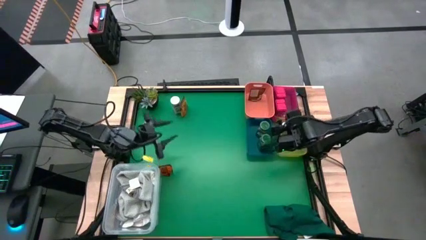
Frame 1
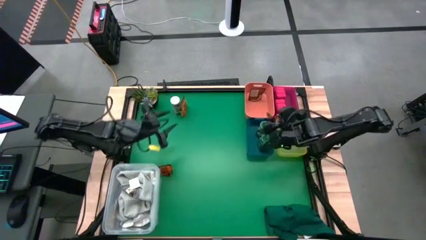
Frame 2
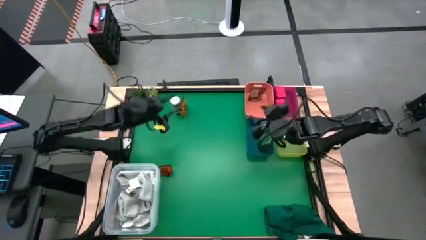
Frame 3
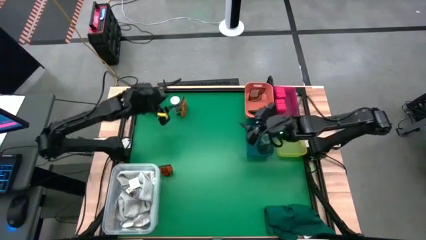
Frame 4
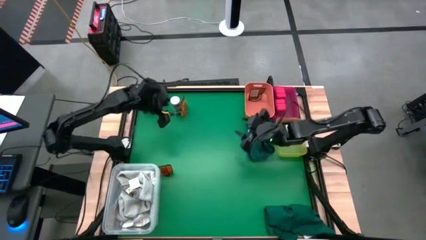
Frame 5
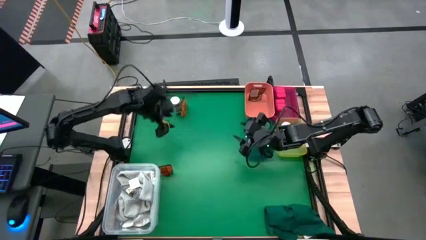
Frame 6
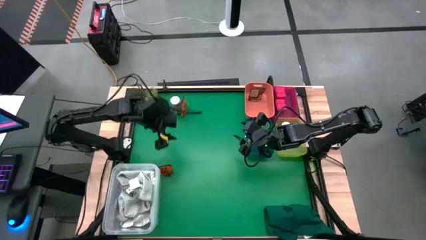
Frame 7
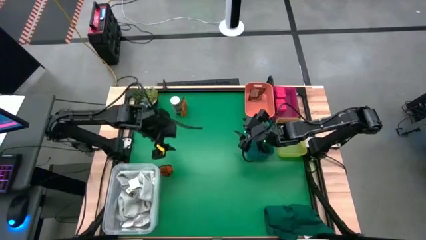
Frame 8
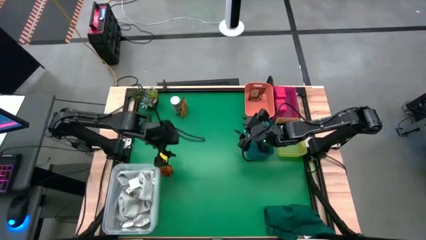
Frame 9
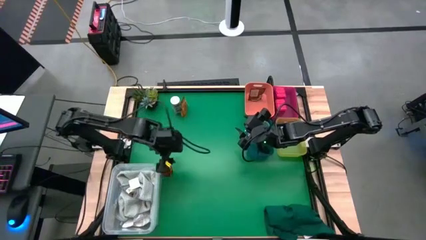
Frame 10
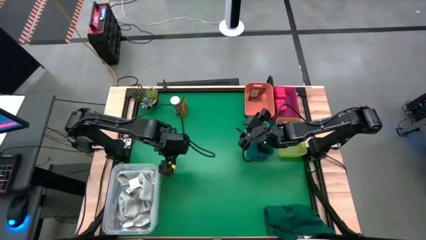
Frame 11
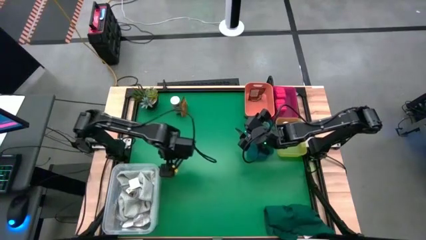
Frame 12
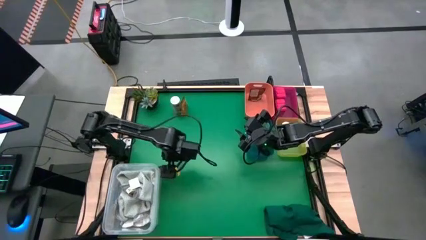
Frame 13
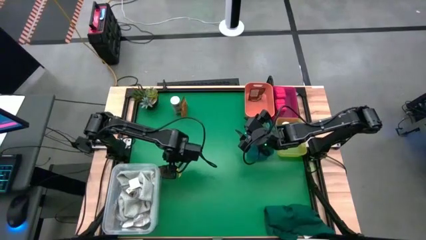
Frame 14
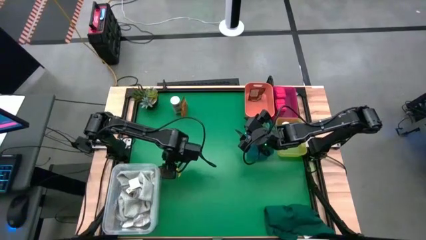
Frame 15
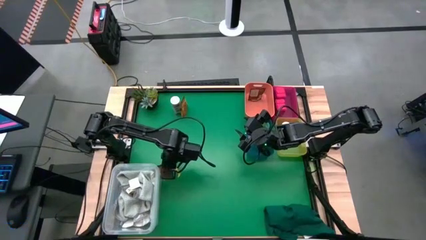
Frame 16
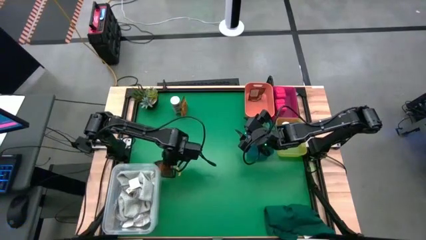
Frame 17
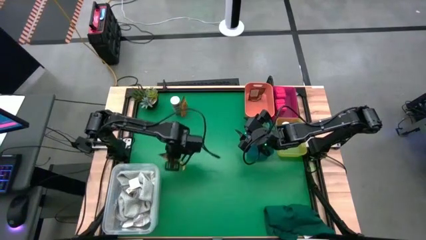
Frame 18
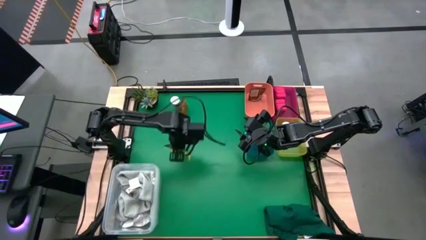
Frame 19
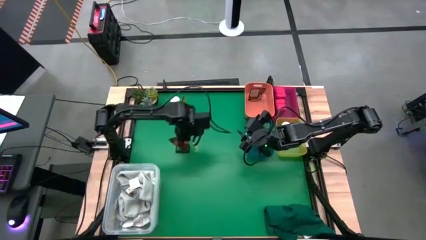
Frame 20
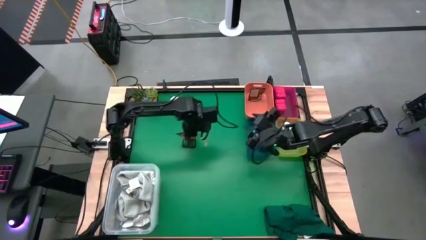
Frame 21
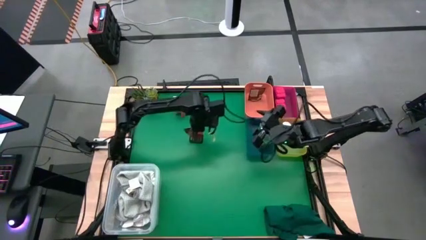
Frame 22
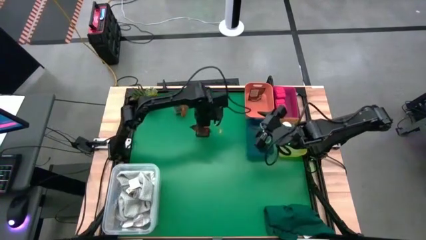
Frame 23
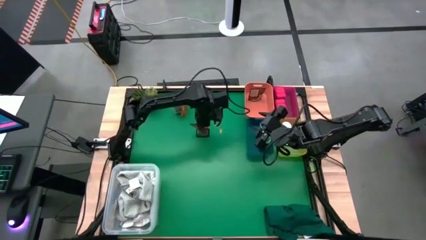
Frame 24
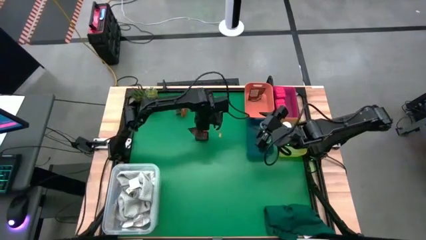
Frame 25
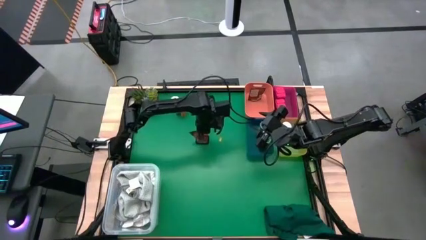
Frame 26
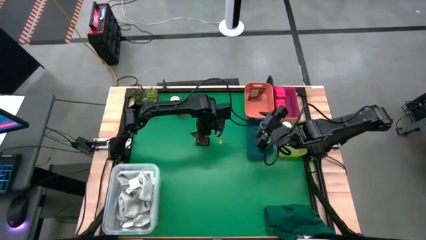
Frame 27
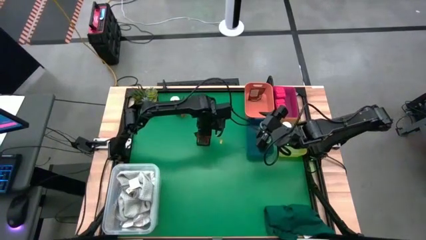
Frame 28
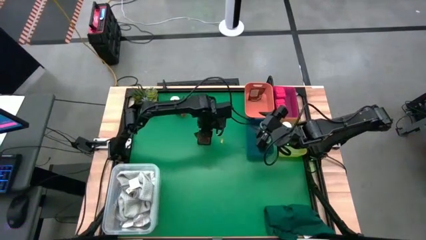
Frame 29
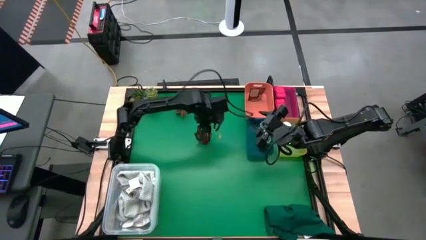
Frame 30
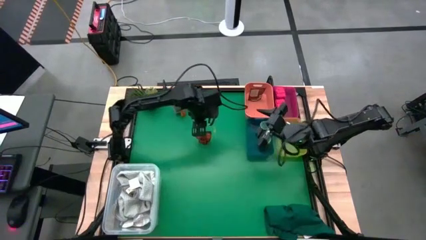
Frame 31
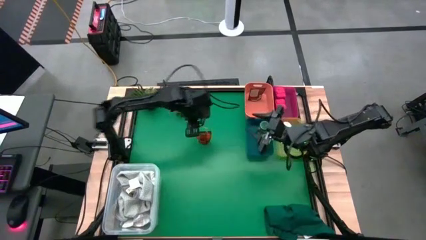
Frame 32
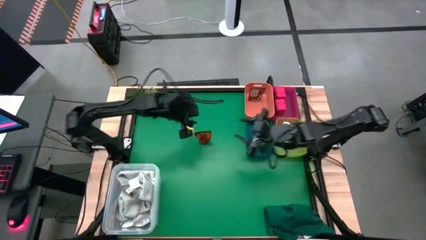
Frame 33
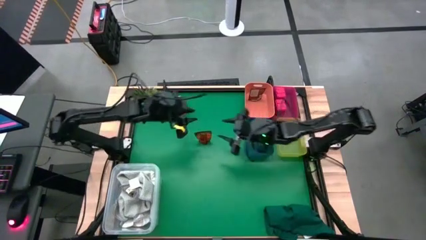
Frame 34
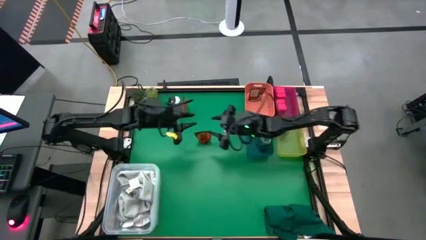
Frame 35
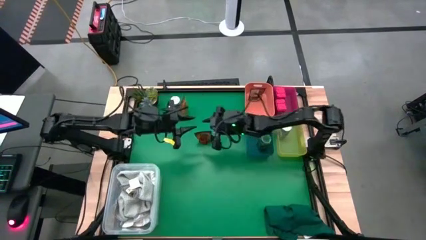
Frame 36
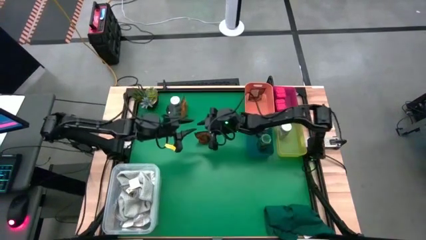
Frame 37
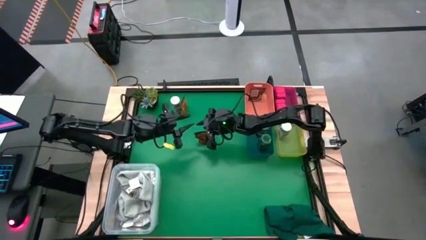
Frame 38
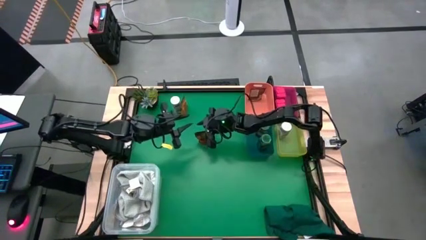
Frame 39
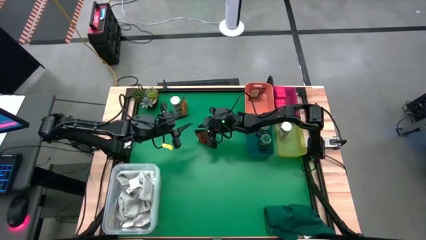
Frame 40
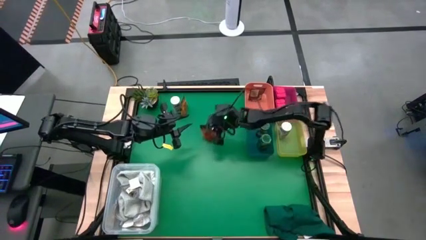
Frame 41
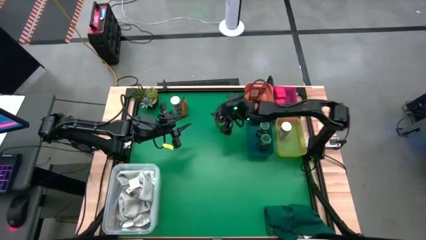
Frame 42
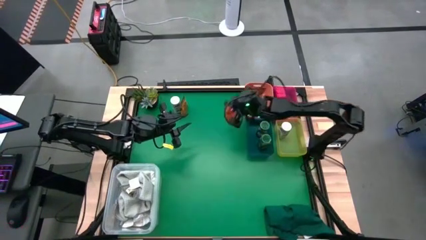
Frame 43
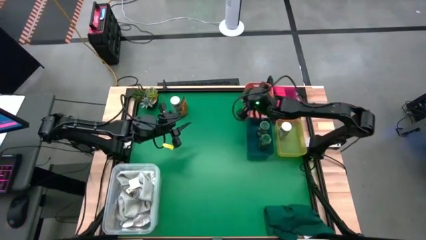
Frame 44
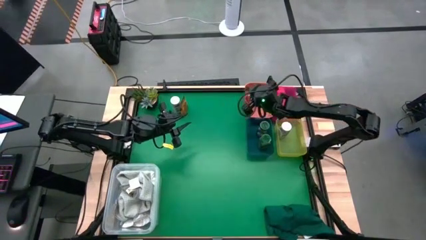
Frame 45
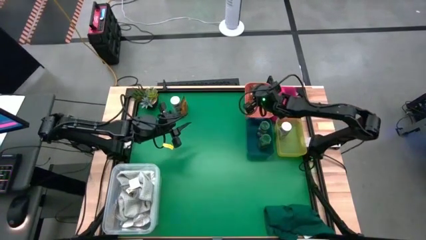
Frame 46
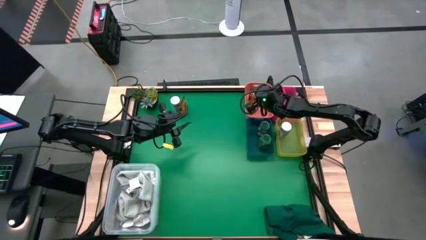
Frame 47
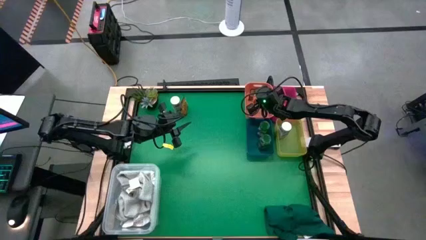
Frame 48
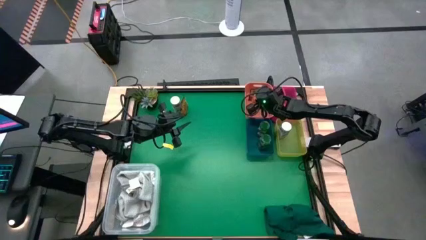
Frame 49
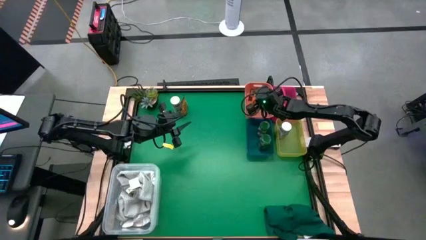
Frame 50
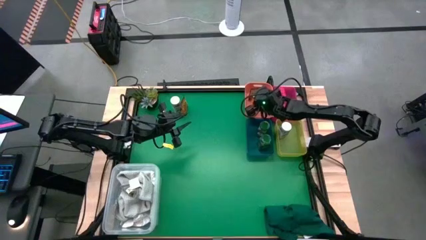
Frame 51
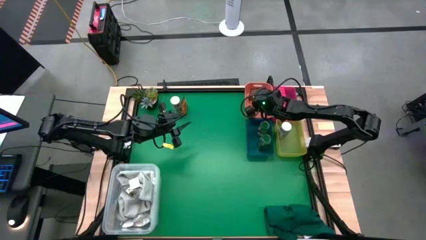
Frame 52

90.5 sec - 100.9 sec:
Task: Sort spices by type
Put the bottom brown seasoning pack into the orange bin

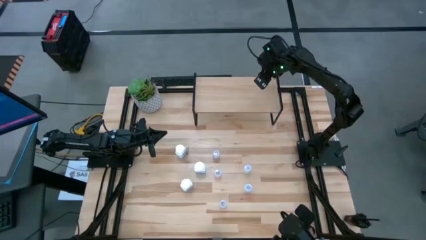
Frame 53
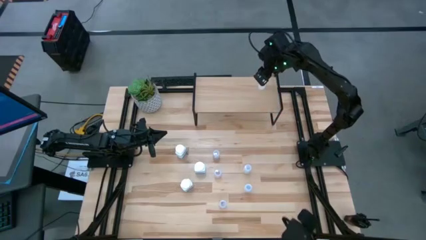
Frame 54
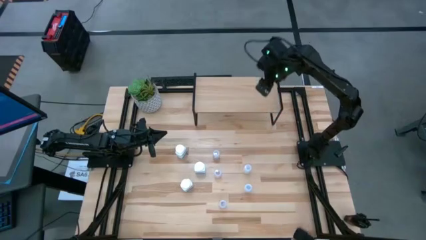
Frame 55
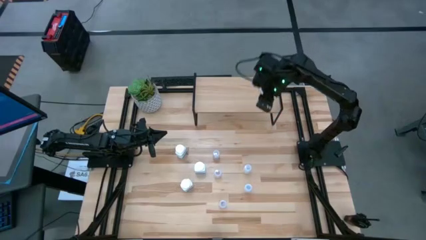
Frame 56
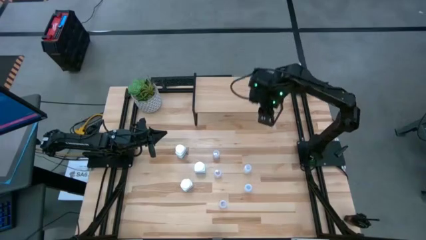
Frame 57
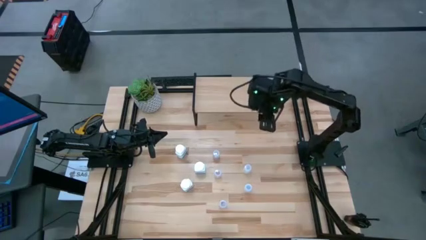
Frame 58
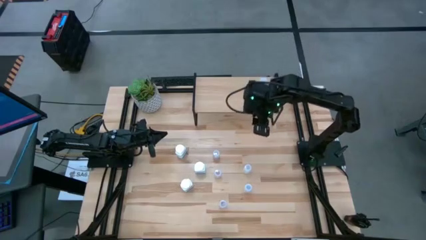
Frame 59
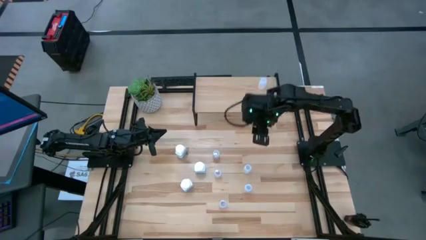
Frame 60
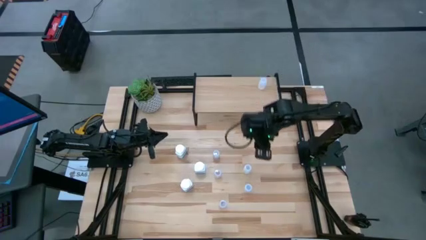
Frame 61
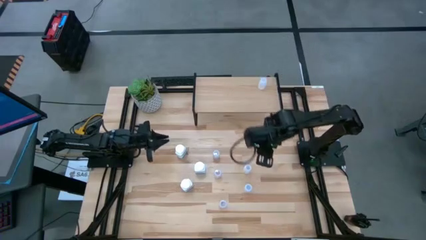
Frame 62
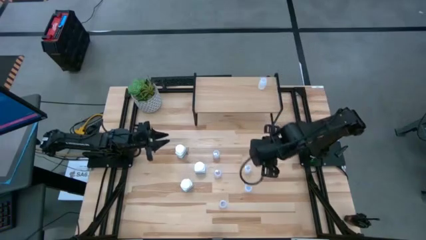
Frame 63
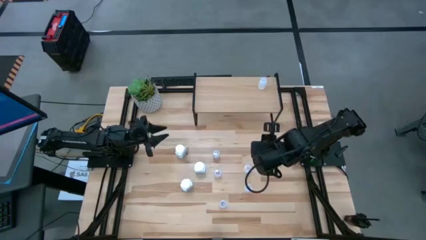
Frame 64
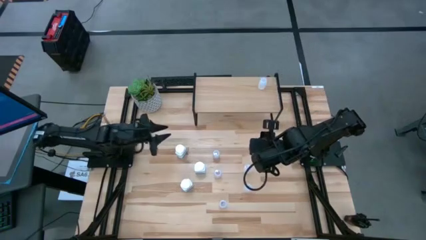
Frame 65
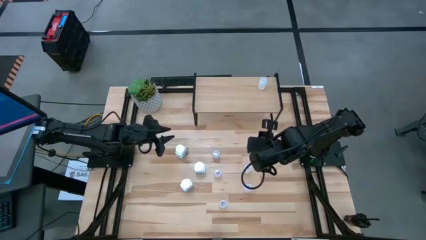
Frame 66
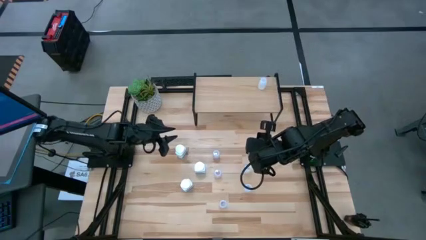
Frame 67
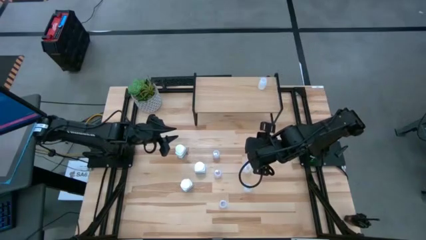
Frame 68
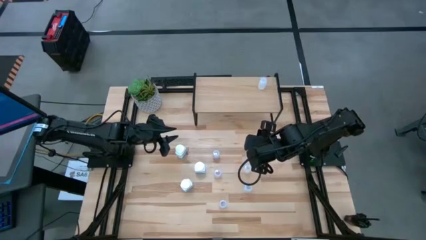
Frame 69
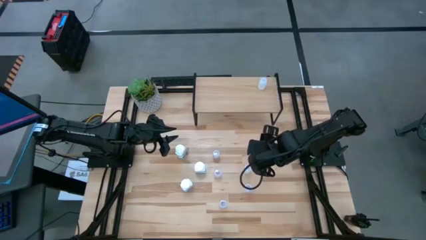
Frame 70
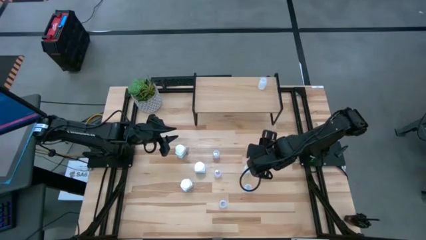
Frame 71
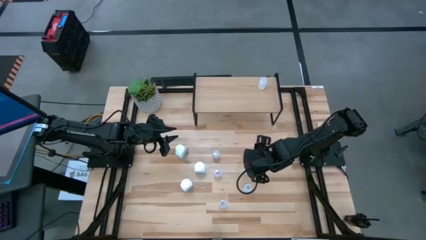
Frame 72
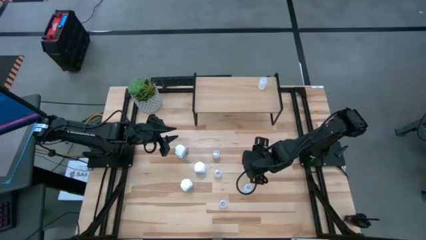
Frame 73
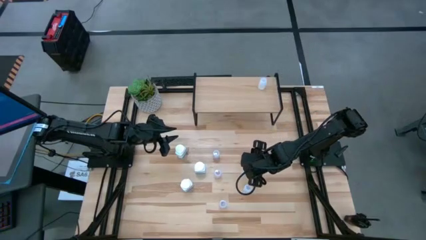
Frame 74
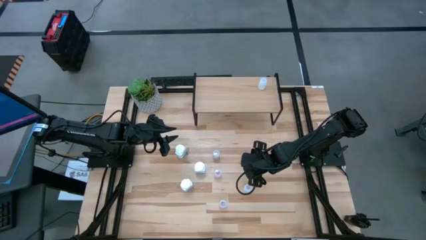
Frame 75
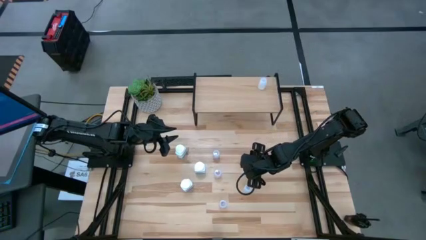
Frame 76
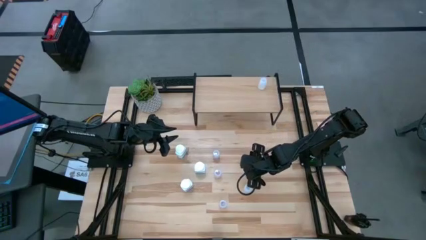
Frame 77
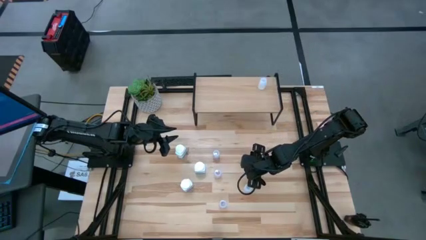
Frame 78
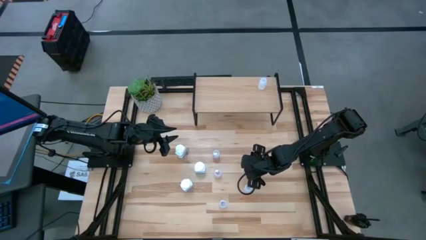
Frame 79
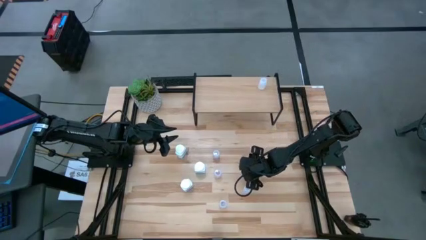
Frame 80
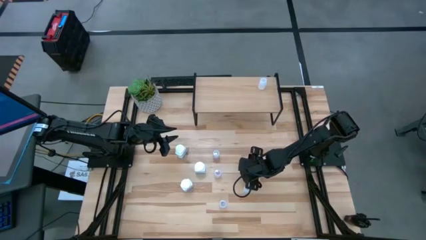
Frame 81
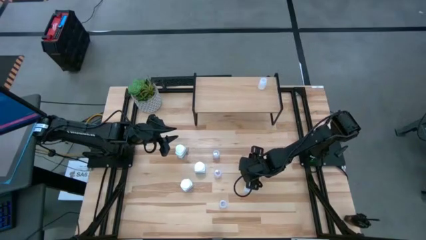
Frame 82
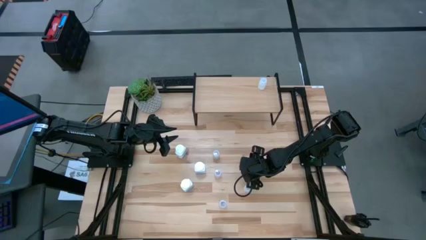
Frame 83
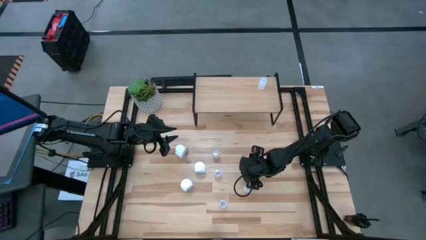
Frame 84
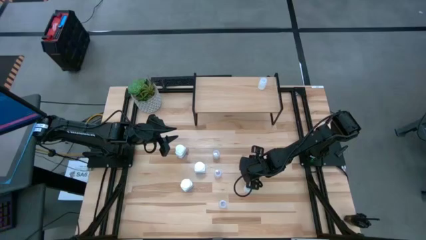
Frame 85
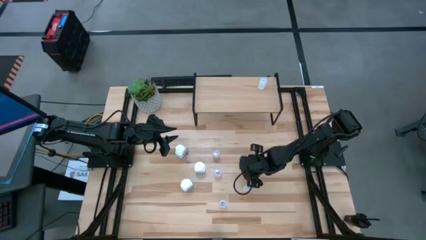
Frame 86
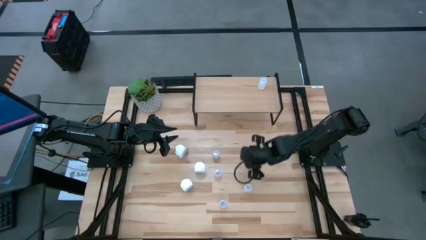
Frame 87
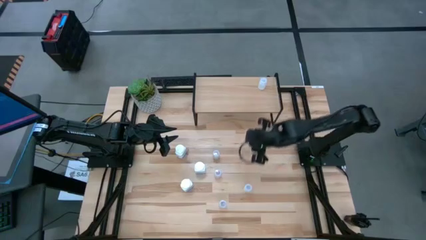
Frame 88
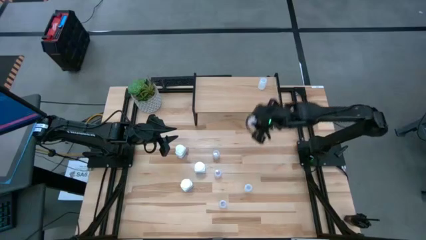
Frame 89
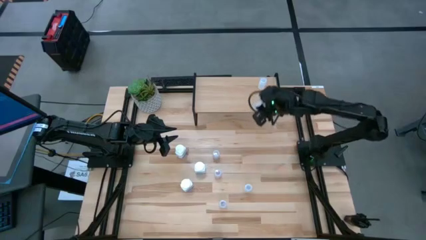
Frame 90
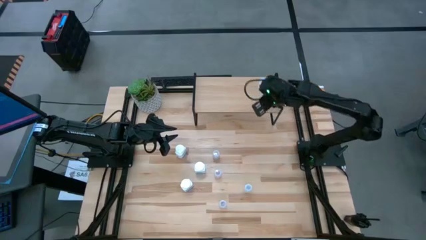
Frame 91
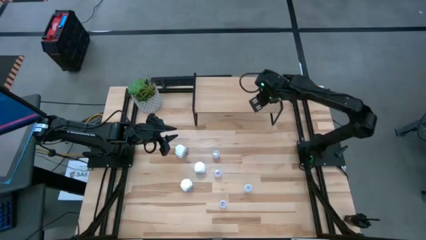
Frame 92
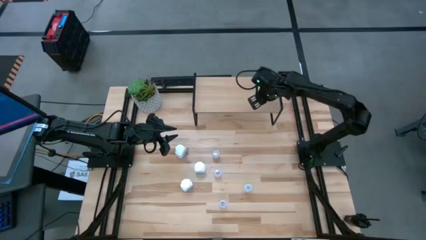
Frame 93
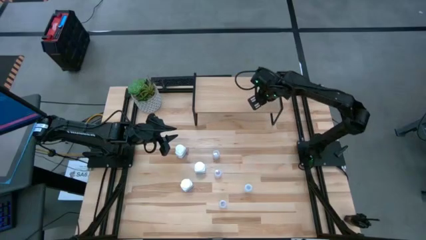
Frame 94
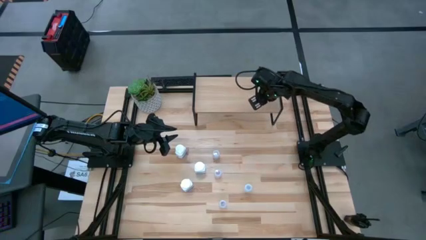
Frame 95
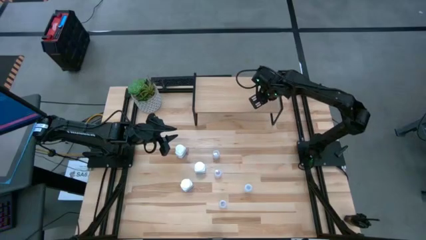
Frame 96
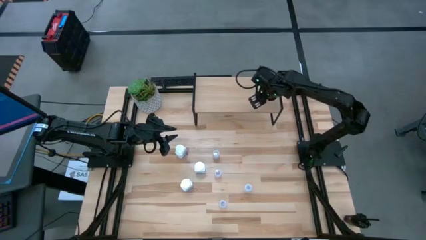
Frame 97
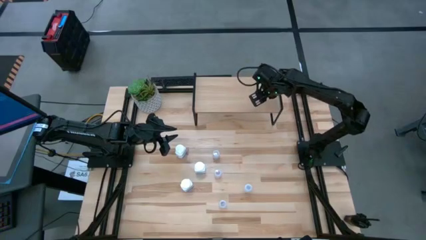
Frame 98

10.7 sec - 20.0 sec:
Task: Pick and place medicine bottles onto shelf by color
Put the top small white pill bottle on the shelf aligned with the other small white pill bottle
